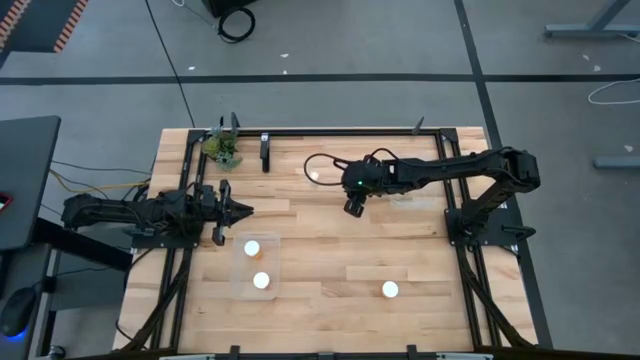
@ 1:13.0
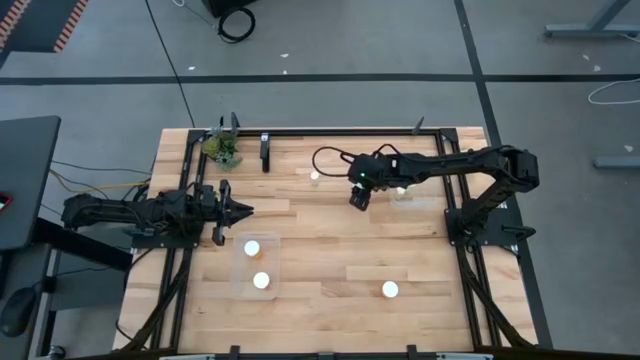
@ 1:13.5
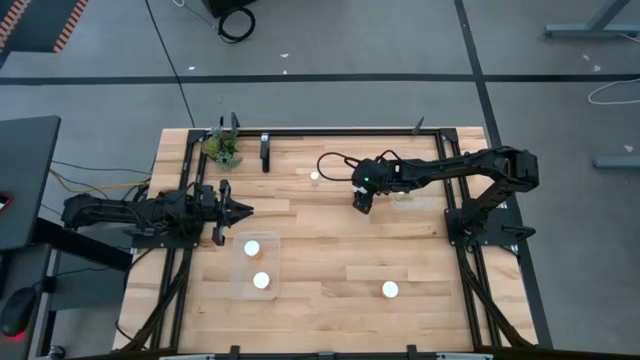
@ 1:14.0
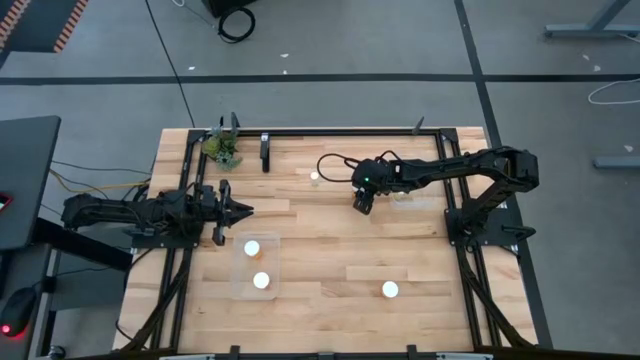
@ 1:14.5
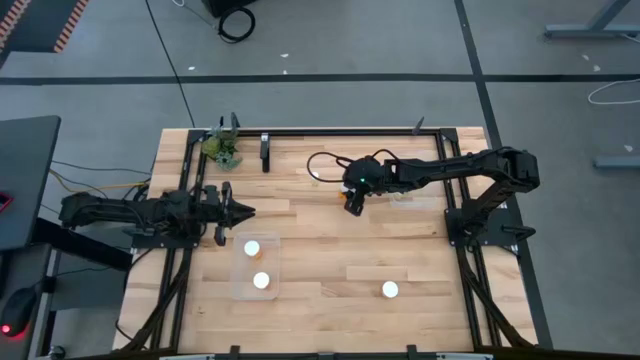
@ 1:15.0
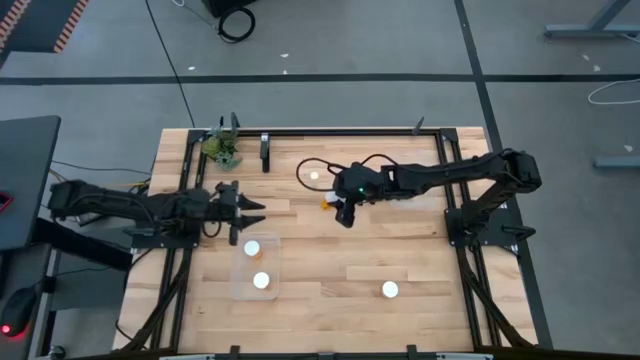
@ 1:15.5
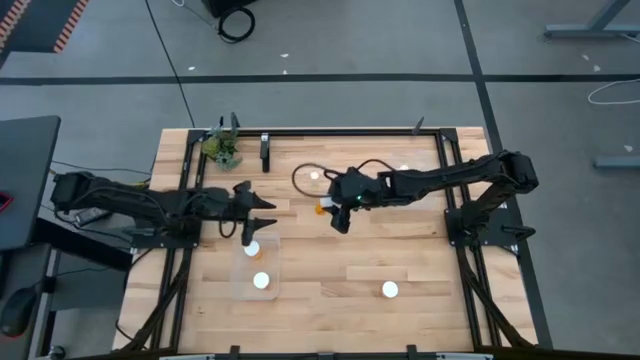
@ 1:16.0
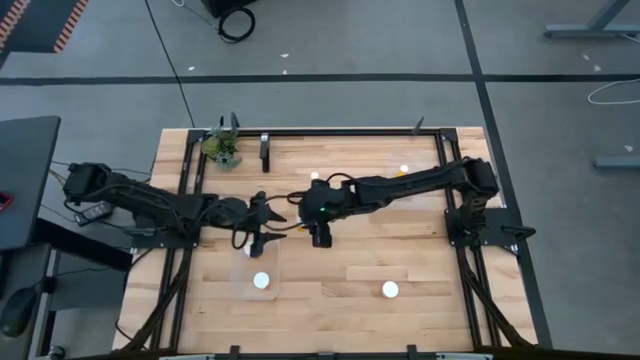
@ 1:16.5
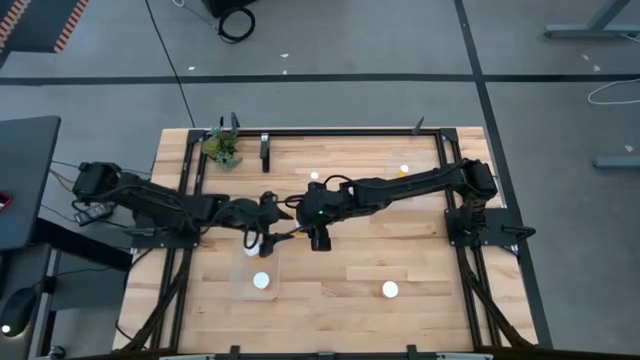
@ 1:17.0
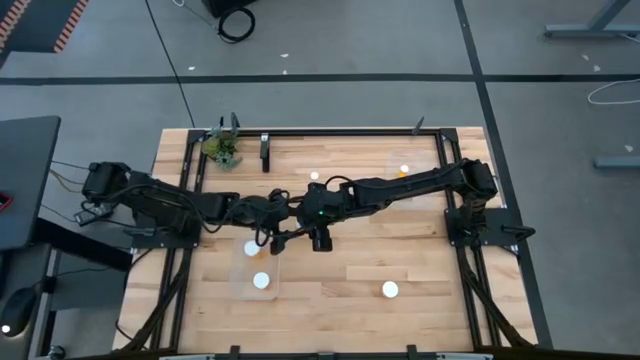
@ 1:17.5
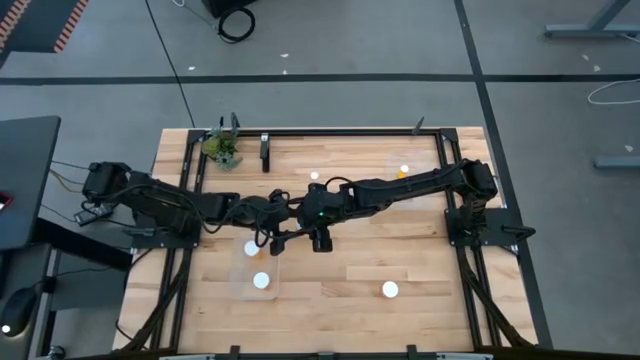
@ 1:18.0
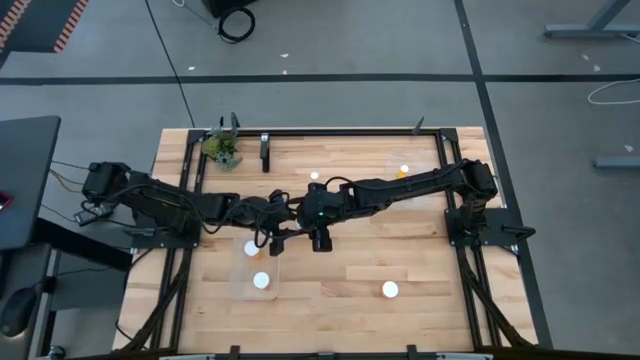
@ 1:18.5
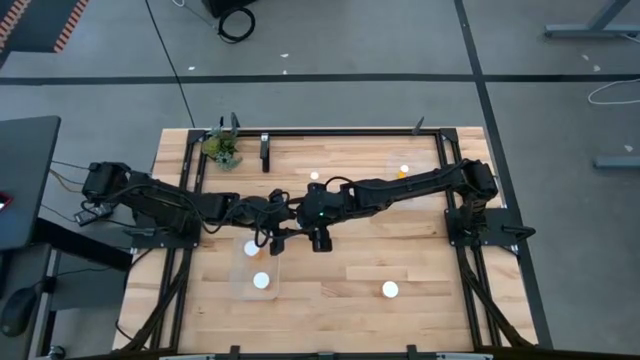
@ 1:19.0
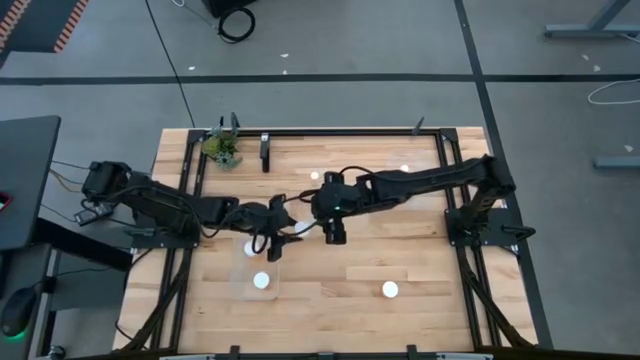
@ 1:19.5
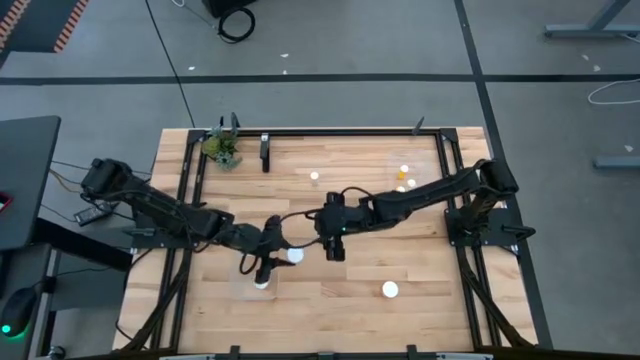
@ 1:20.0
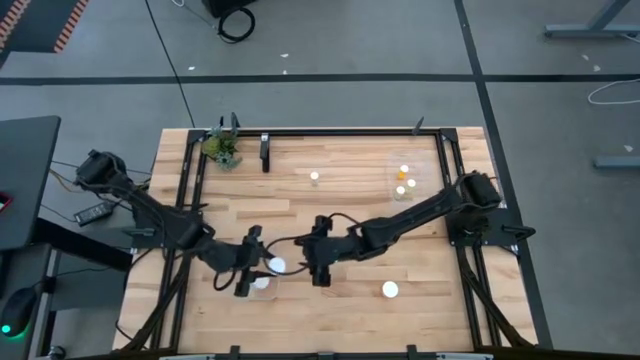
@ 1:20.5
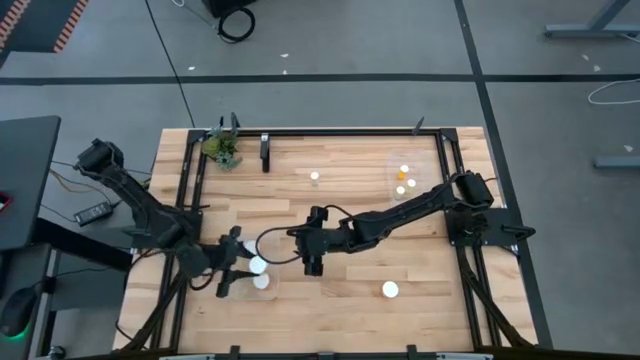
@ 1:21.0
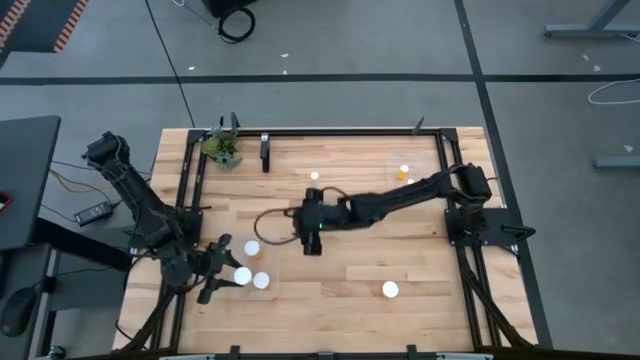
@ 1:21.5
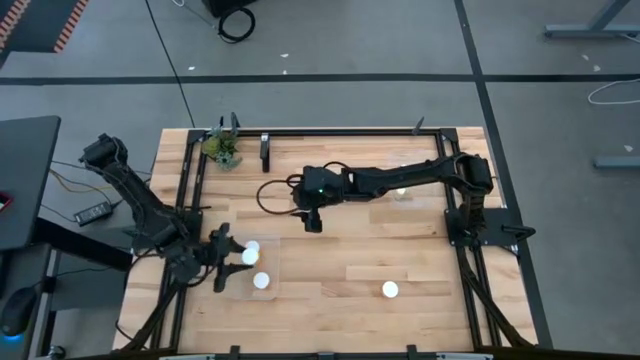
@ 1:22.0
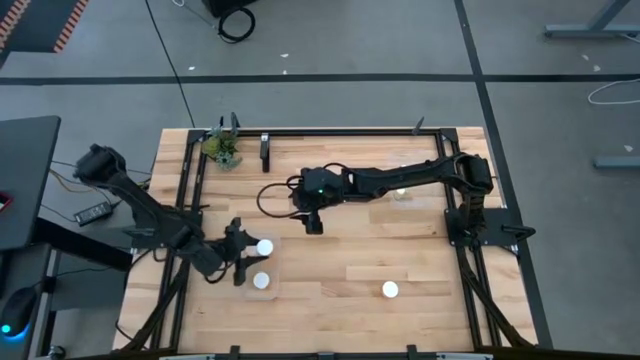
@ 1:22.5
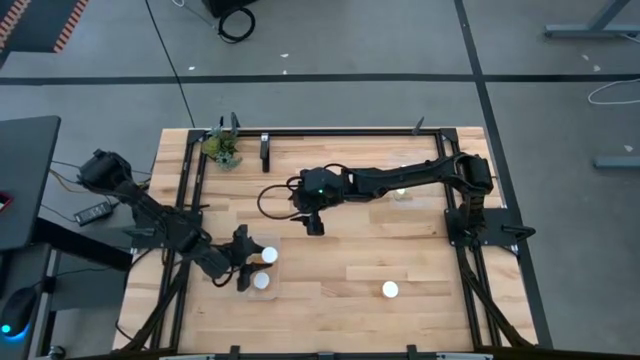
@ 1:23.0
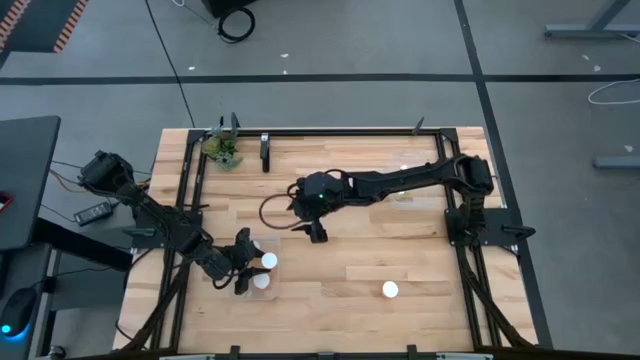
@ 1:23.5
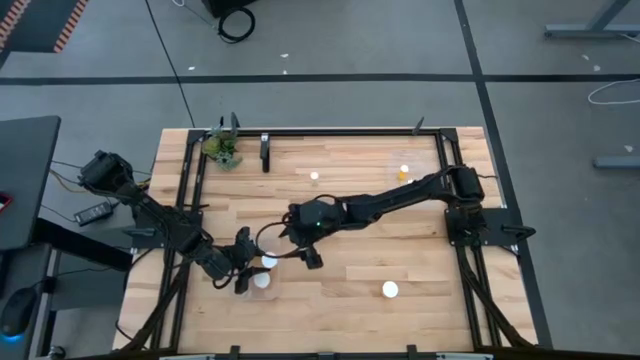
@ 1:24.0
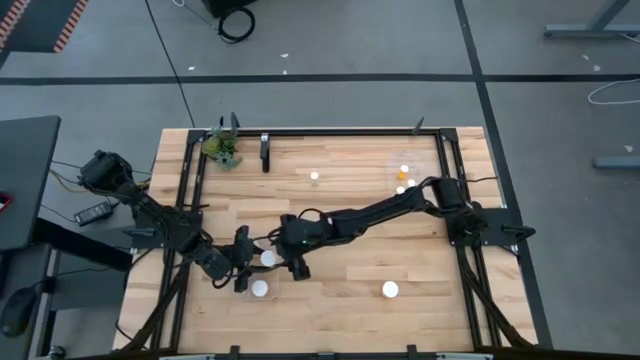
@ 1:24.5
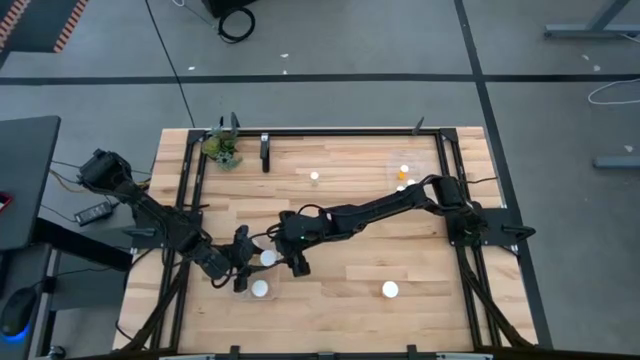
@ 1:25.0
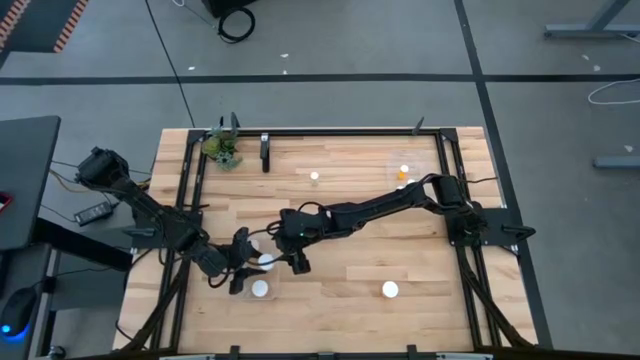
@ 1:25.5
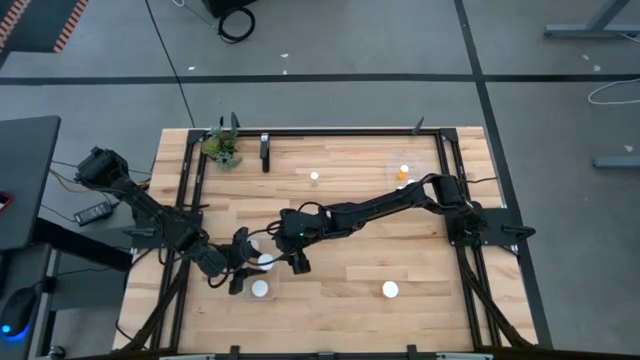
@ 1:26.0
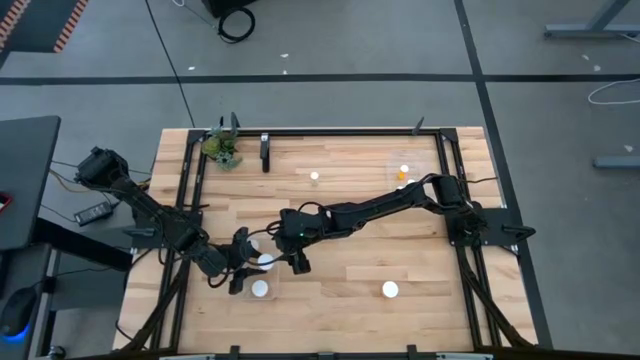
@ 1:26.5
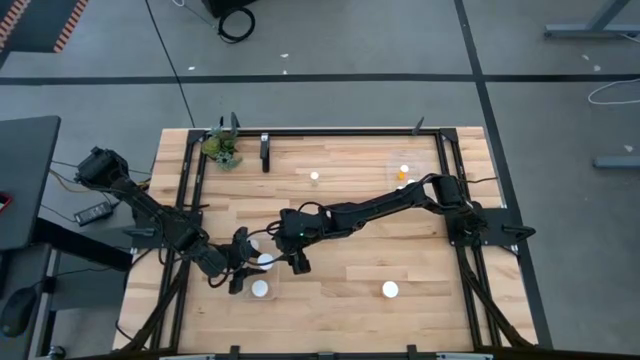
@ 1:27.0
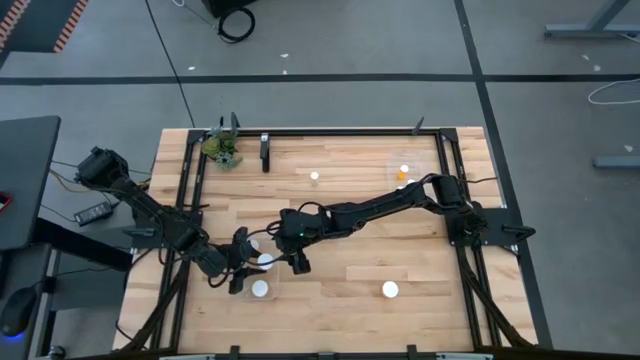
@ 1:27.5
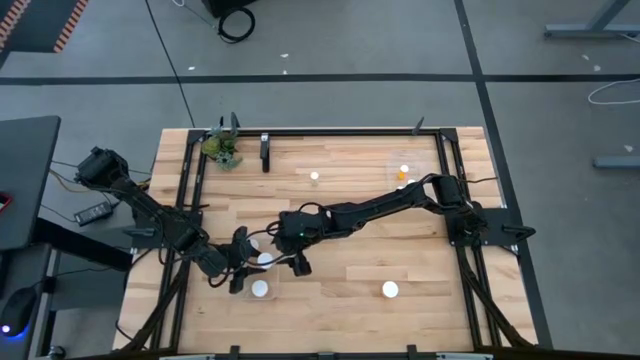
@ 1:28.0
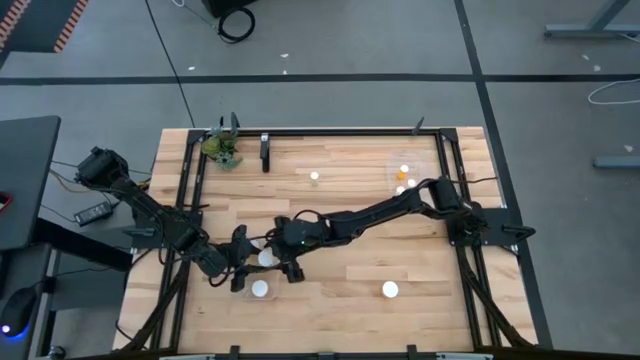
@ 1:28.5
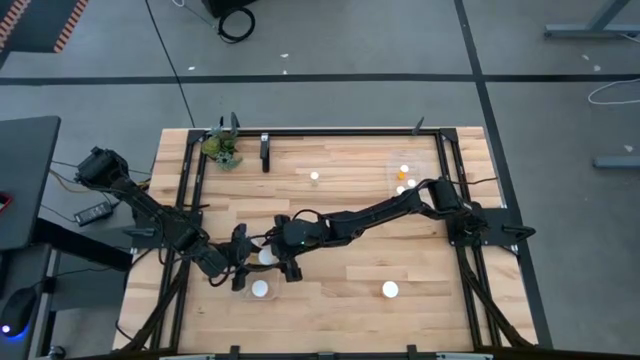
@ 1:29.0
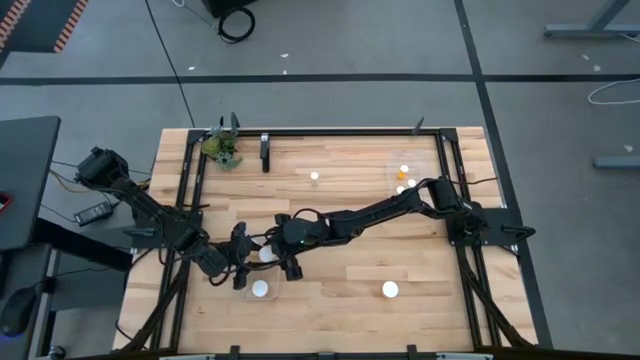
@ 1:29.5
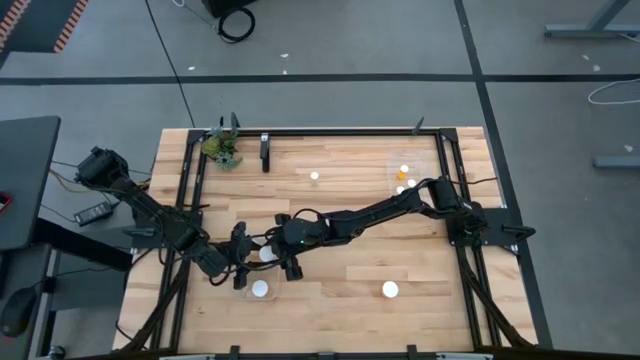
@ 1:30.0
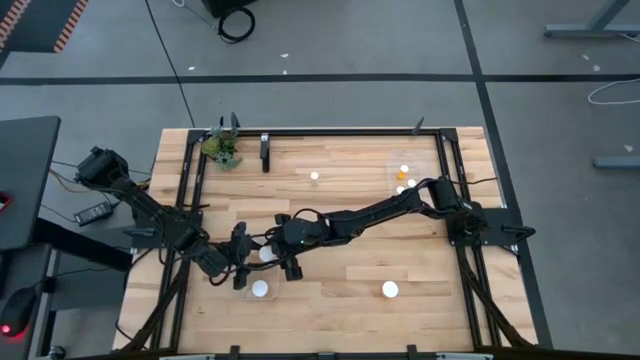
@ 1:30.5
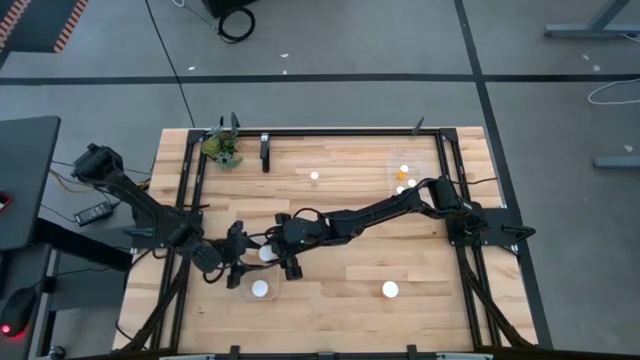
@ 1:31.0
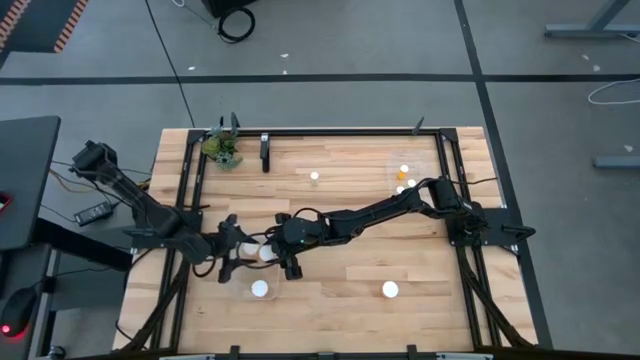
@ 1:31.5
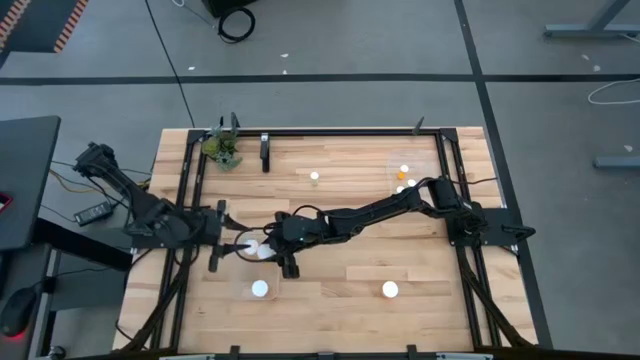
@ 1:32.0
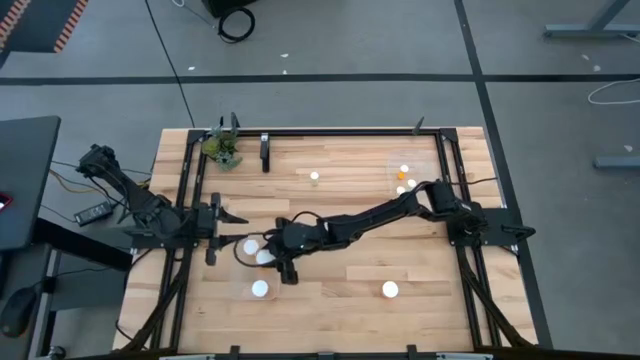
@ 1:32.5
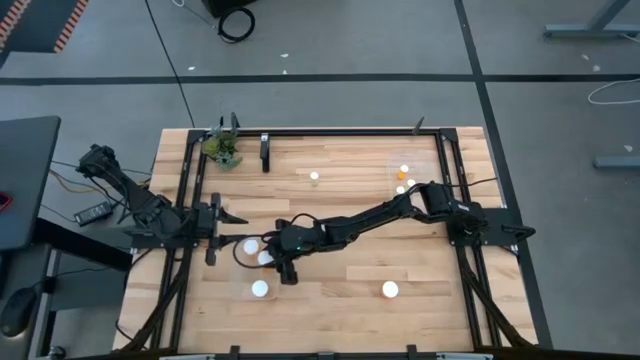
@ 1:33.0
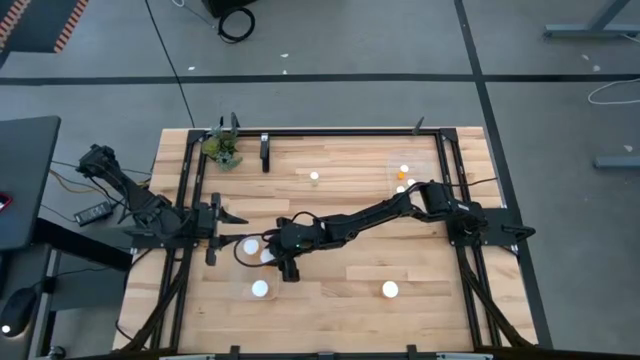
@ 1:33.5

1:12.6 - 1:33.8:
Task: Pick and place medicine bottles into bin by pill shape (circle, oval)
Put the large orange pill bottle into the bottom transparent bin
